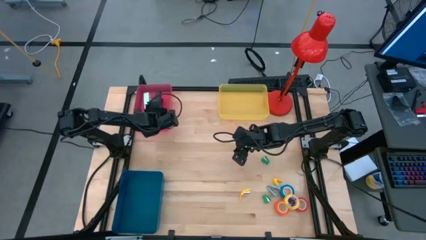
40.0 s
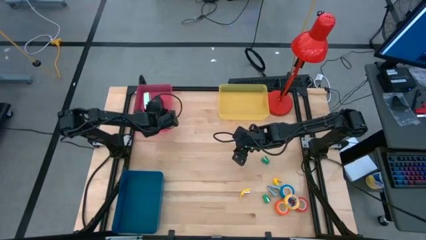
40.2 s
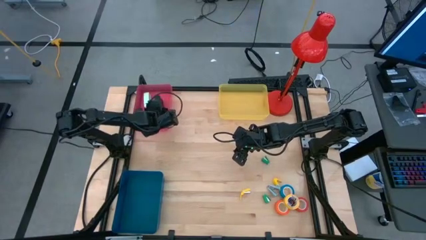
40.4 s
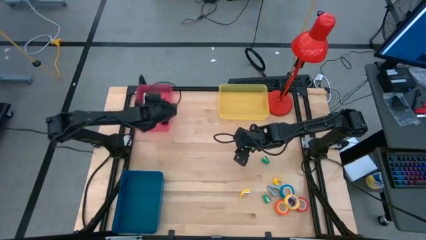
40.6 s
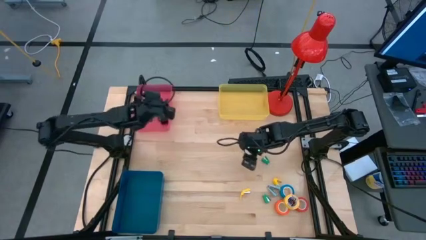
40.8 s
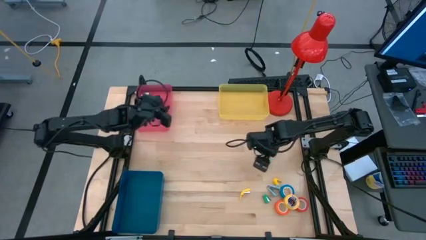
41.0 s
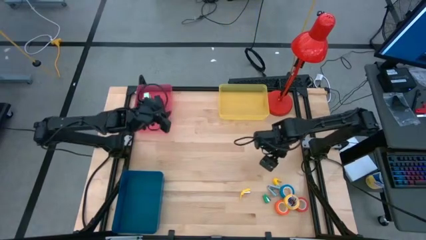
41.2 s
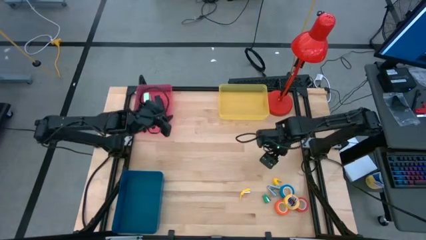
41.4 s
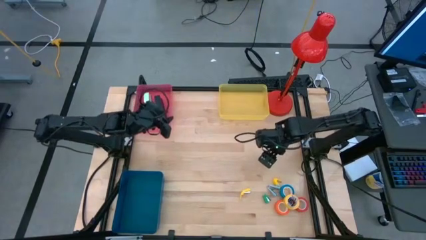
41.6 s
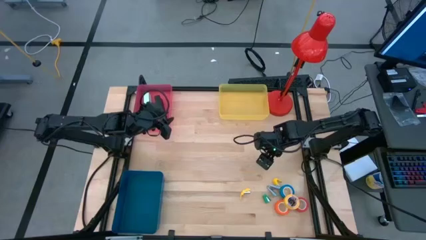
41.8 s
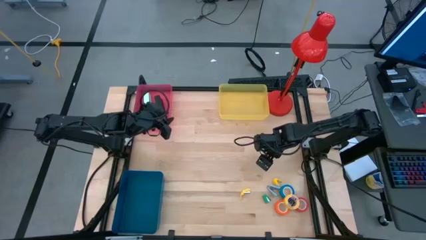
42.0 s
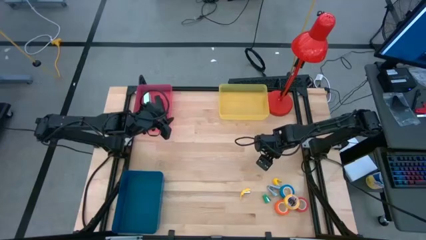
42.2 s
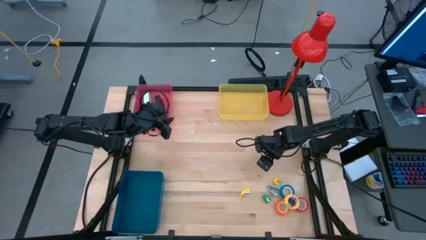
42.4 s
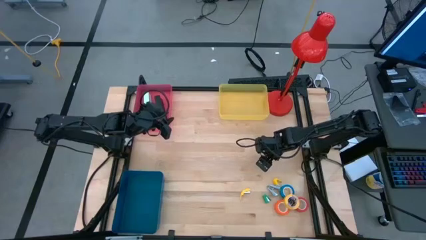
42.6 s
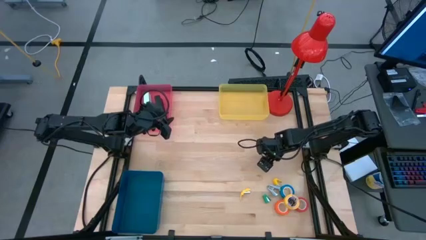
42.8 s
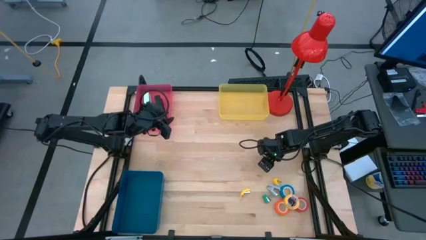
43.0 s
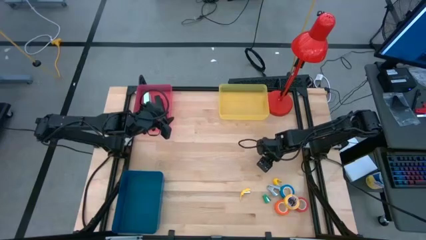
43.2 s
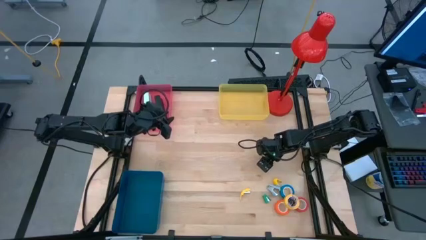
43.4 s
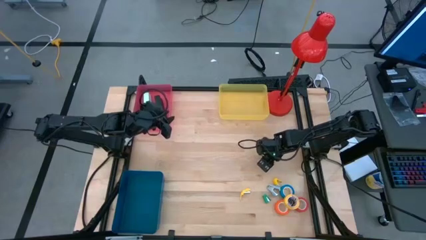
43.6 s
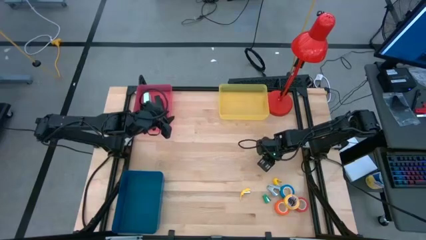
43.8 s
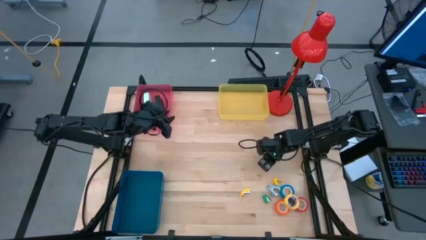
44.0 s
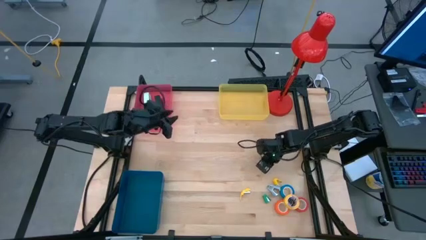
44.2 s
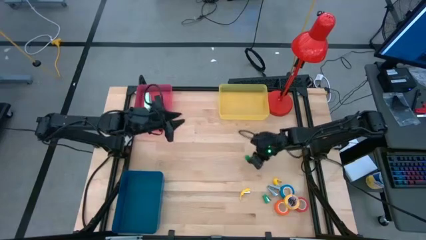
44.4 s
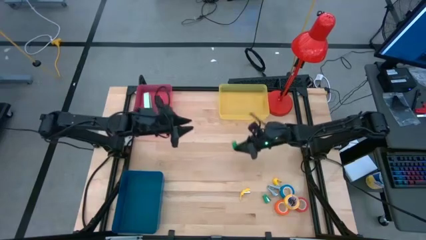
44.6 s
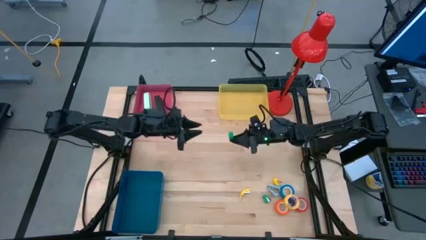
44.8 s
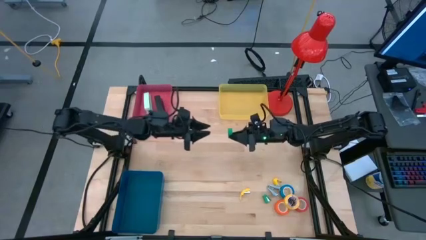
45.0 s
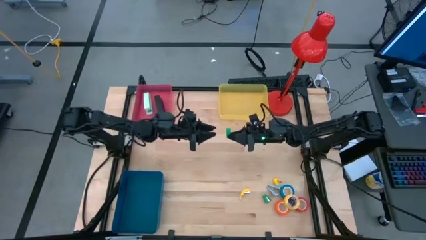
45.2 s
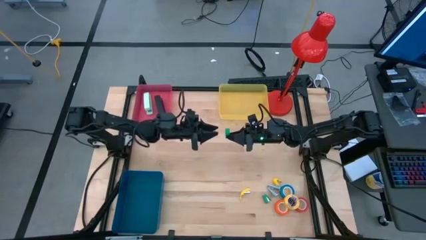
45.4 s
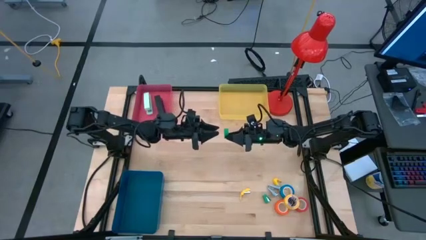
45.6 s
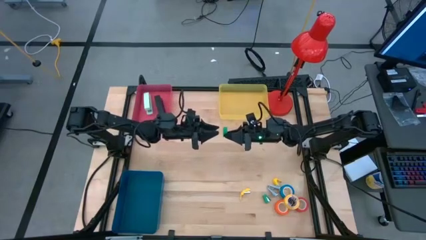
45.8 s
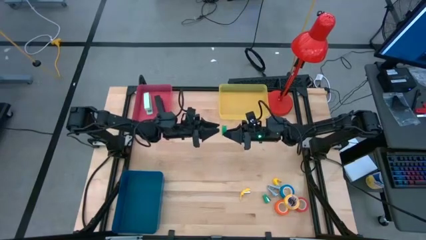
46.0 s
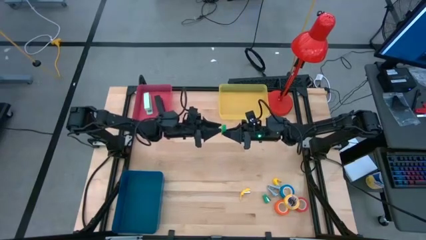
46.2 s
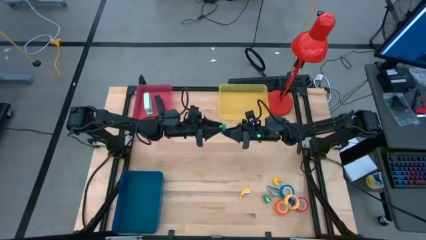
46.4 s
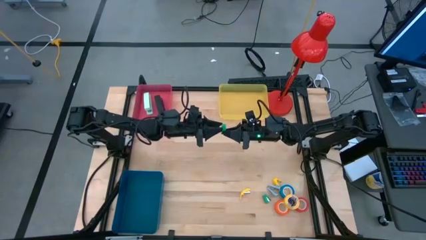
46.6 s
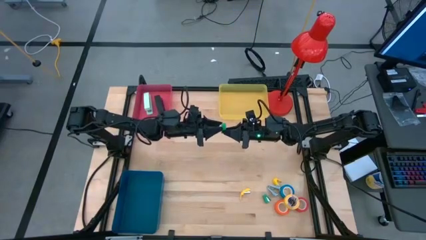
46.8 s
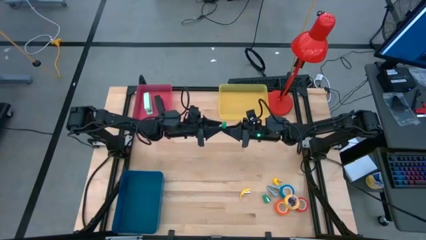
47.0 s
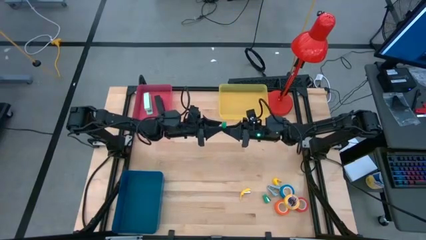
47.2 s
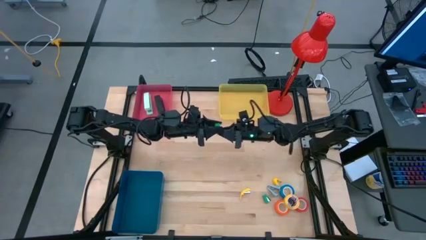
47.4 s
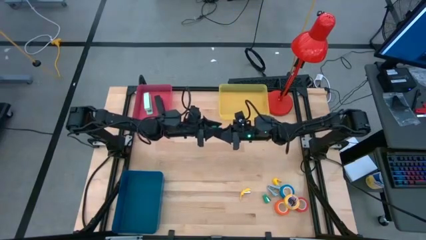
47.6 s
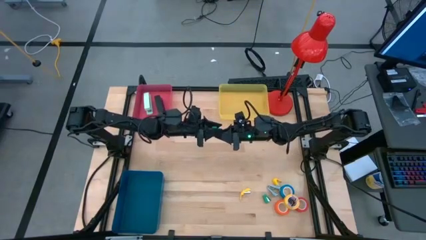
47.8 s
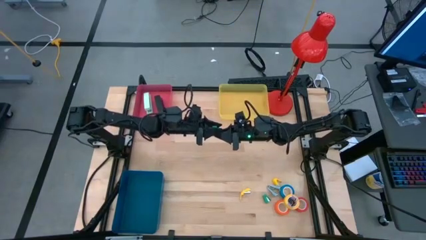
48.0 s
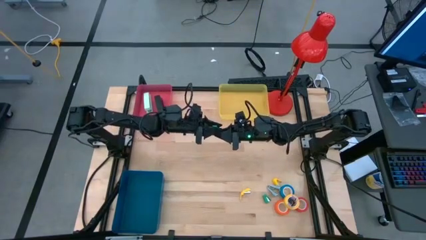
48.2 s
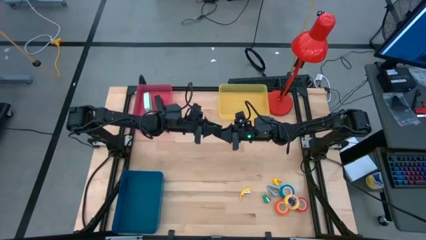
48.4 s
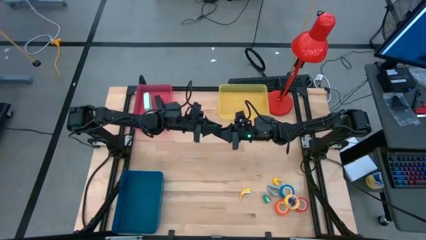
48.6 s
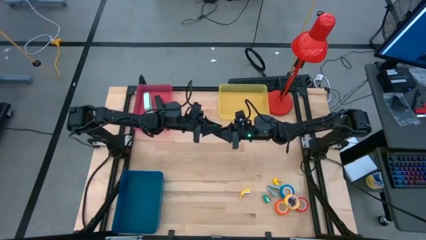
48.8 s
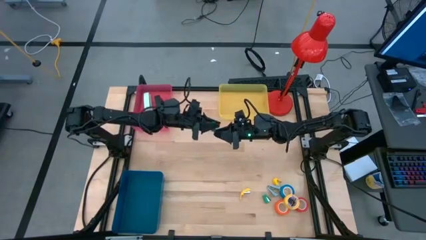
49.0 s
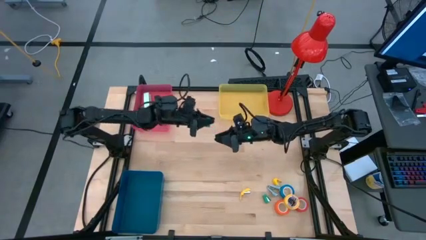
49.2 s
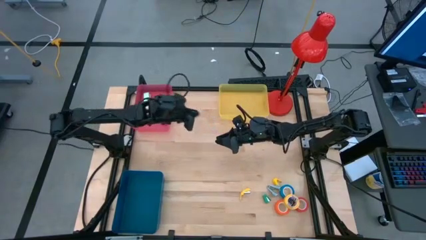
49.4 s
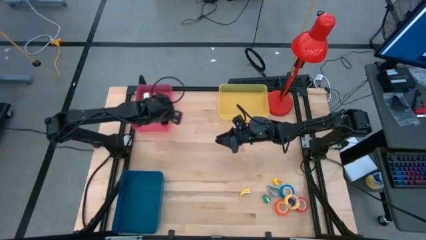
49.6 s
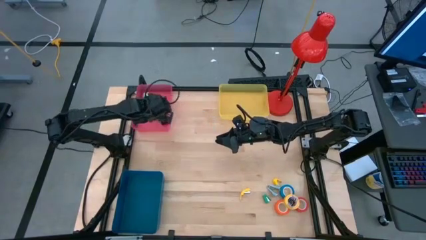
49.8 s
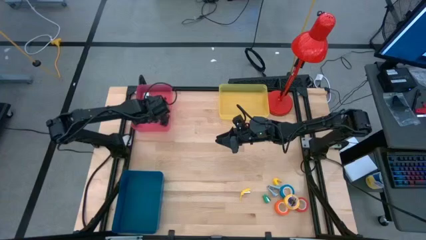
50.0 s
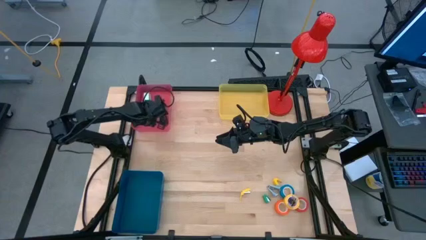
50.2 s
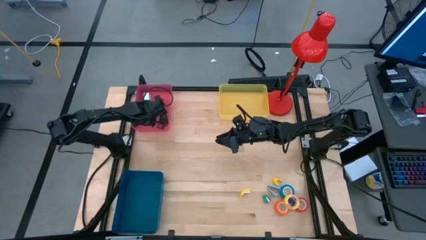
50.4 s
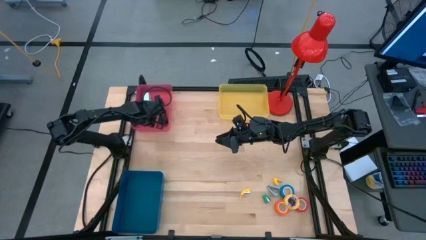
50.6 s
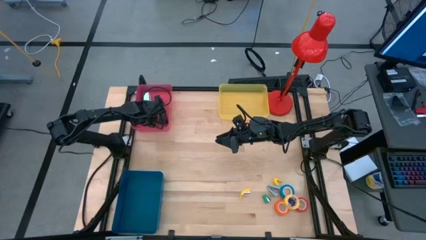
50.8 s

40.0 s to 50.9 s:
Task: Pick and place Stapler, Stapler remover, tape
Put the top green stapler into the red bin
